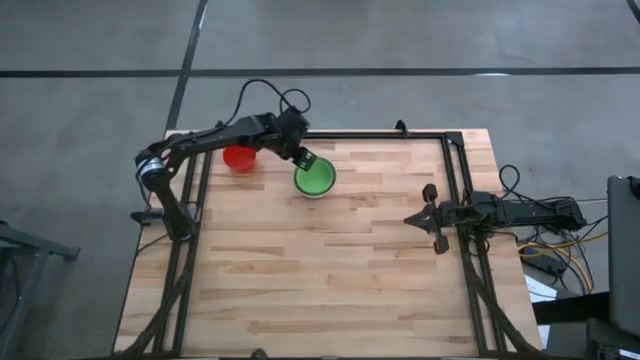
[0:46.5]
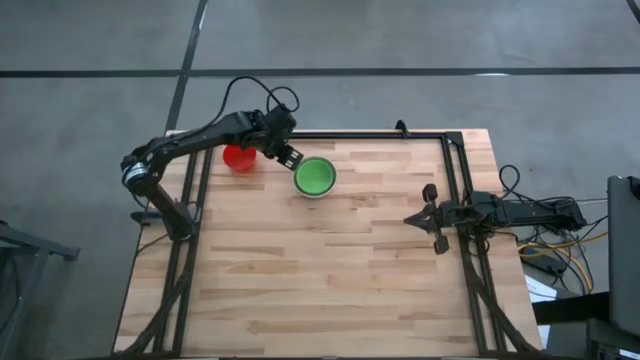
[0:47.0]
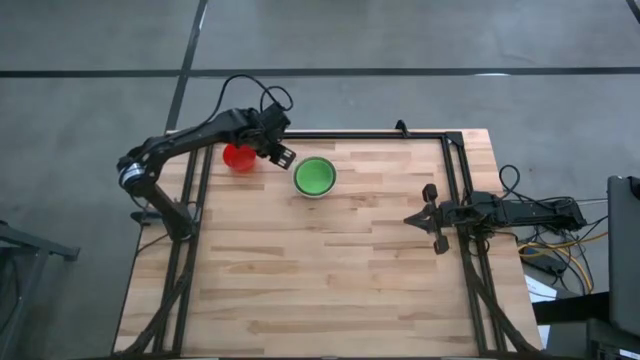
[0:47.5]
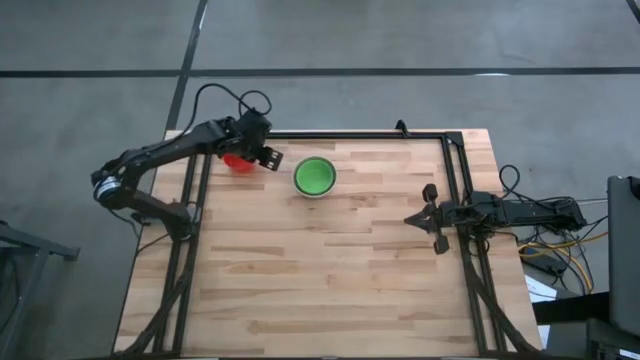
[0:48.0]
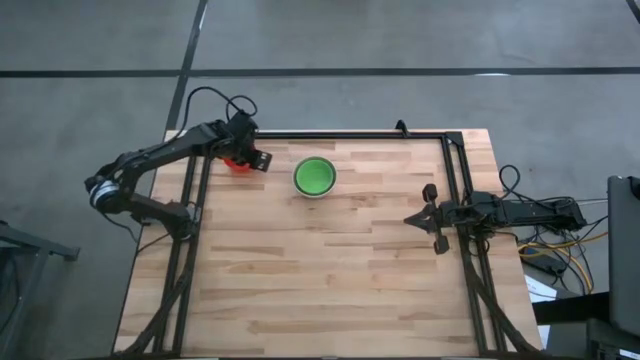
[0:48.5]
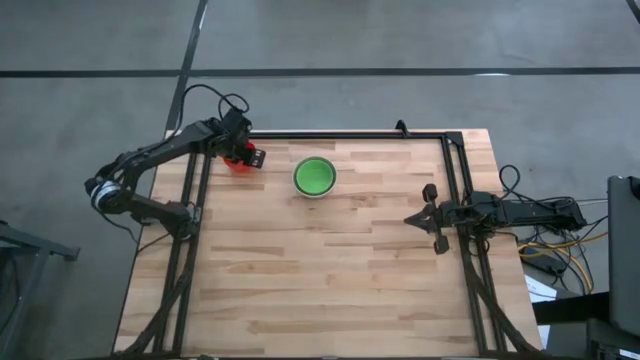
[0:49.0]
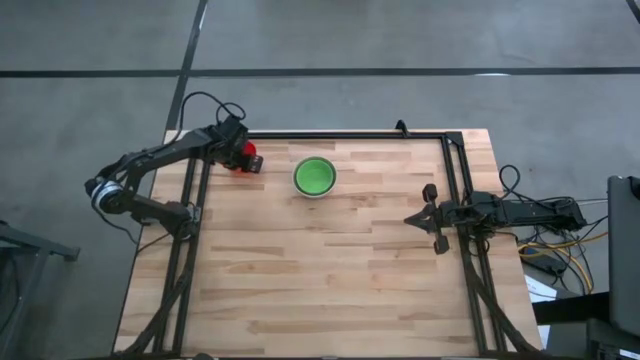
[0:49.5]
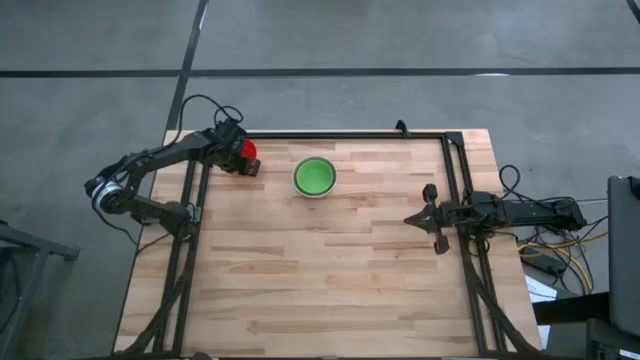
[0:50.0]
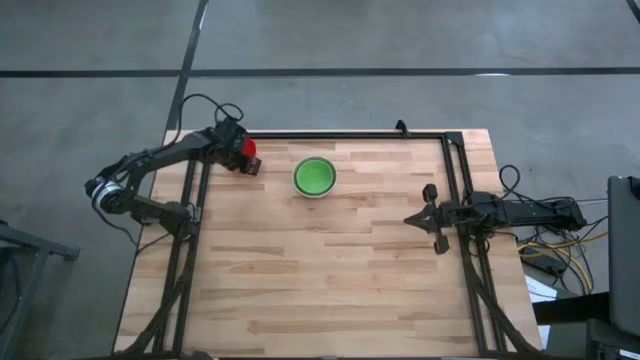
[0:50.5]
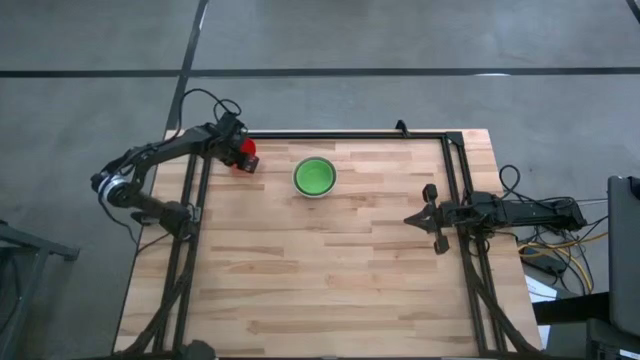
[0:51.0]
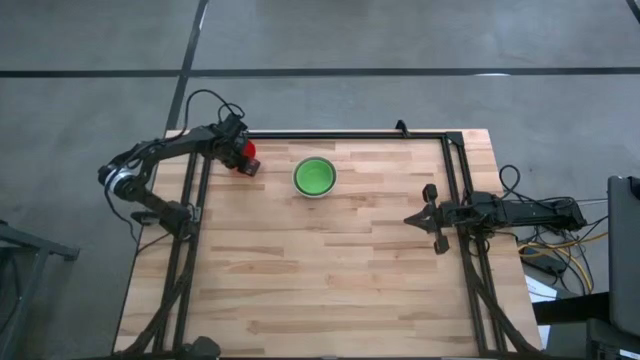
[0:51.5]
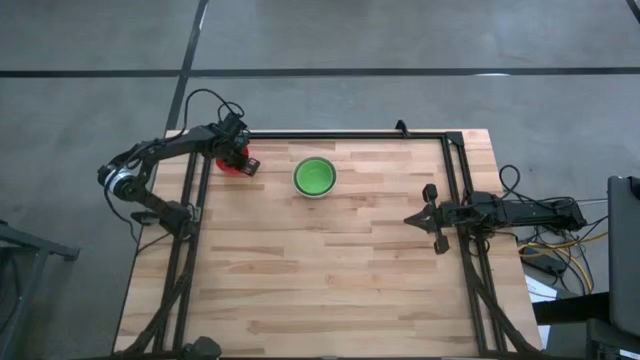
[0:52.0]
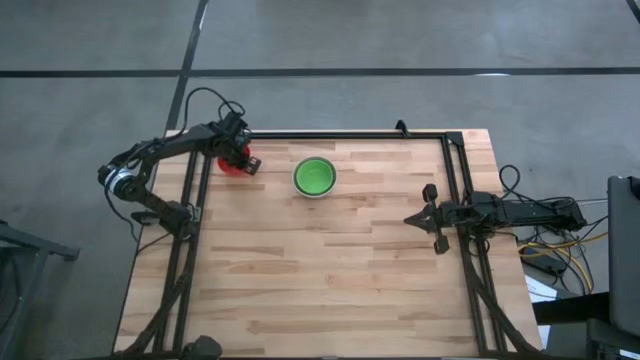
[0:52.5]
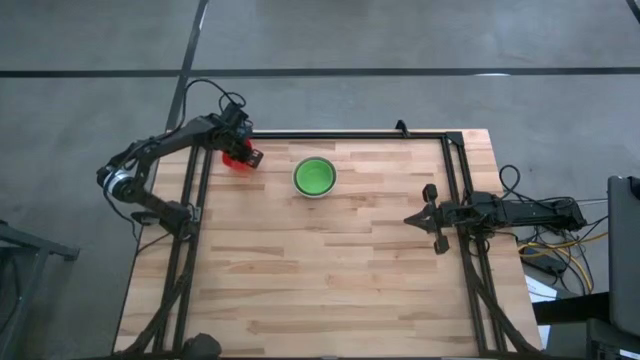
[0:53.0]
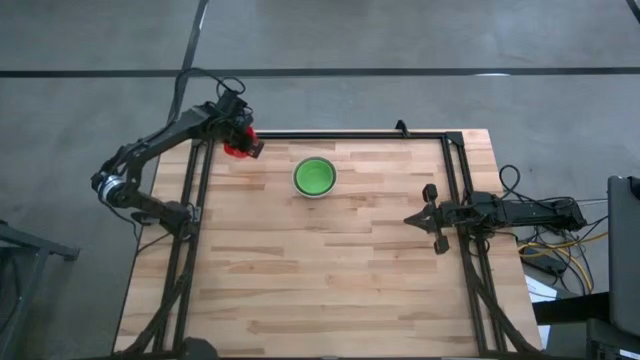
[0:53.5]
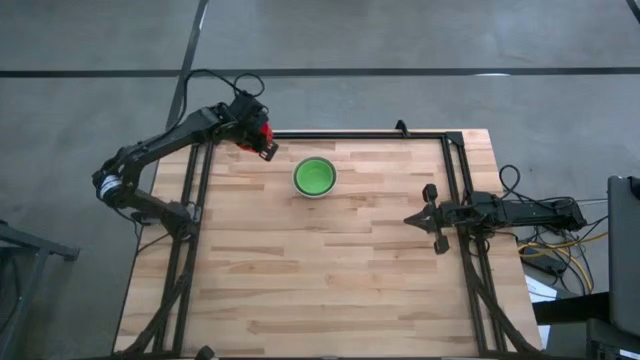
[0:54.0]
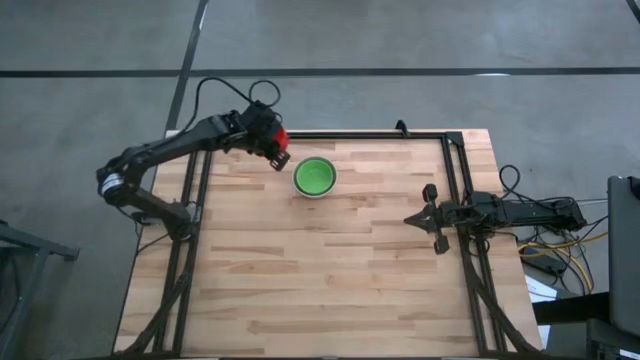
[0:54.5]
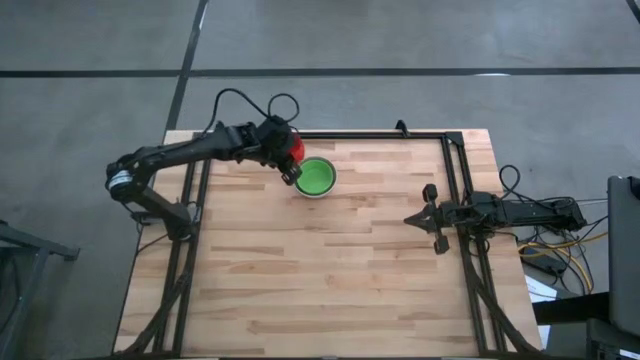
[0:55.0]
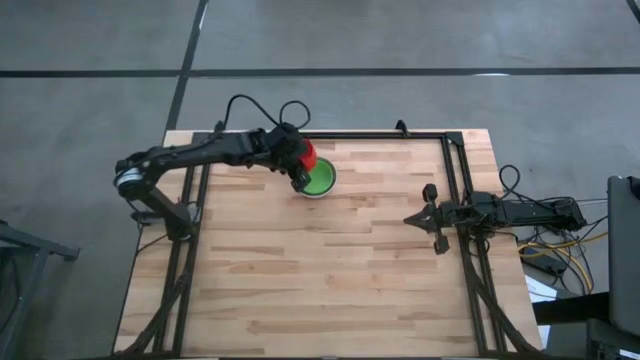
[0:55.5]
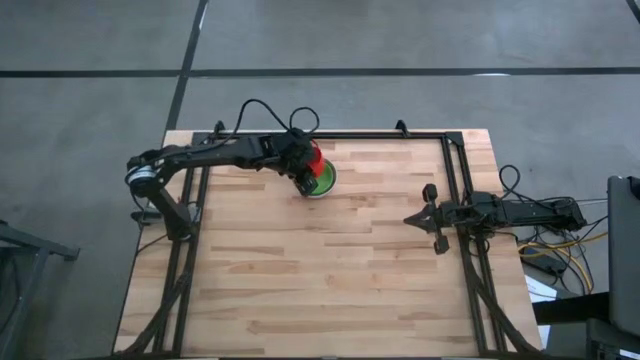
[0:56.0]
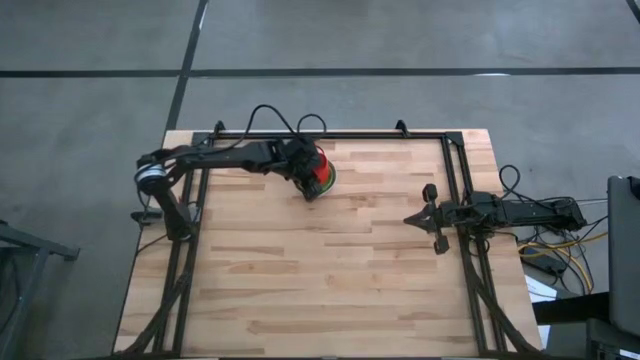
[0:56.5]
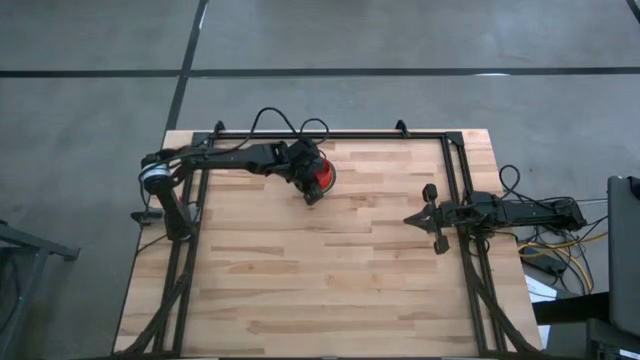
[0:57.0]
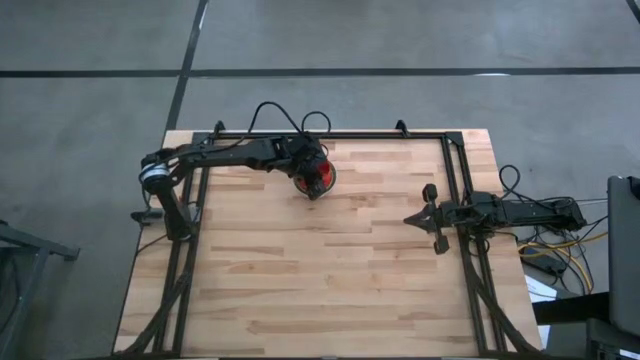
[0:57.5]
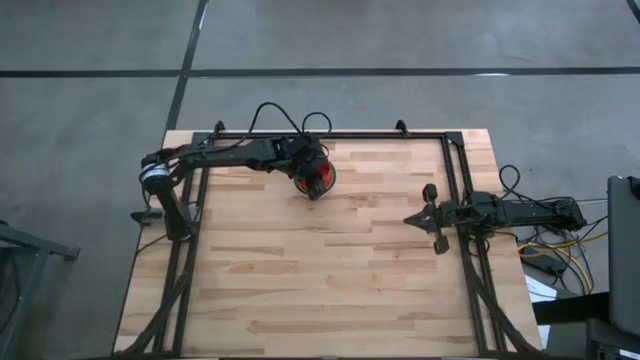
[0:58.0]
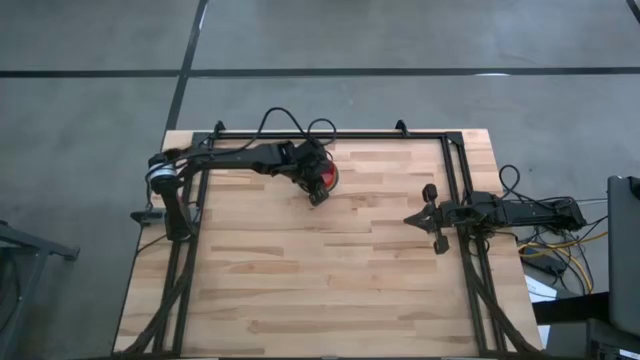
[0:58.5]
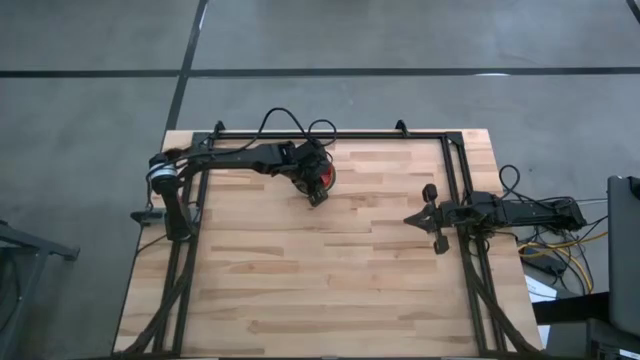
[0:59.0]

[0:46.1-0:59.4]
Stack the red bowl on the green bowl

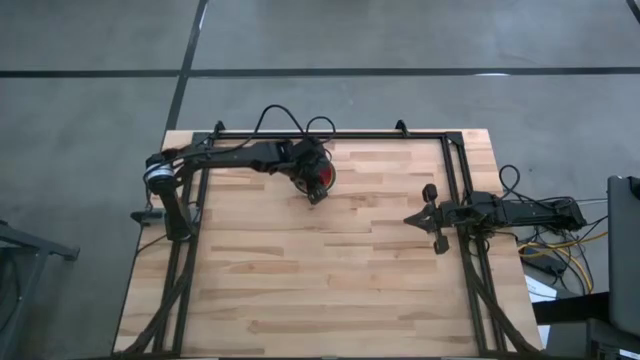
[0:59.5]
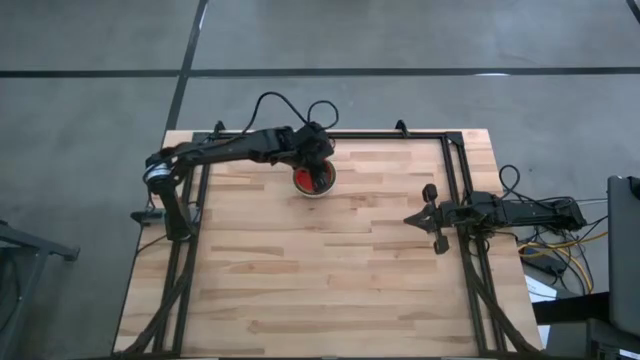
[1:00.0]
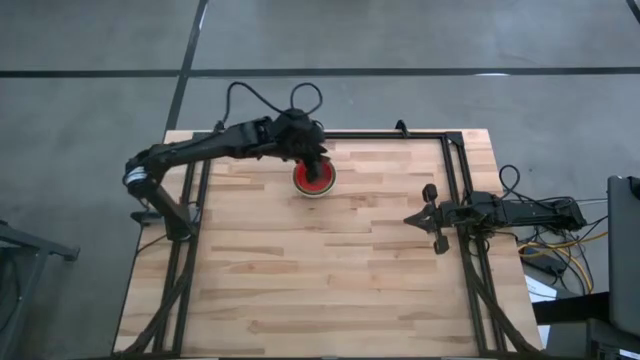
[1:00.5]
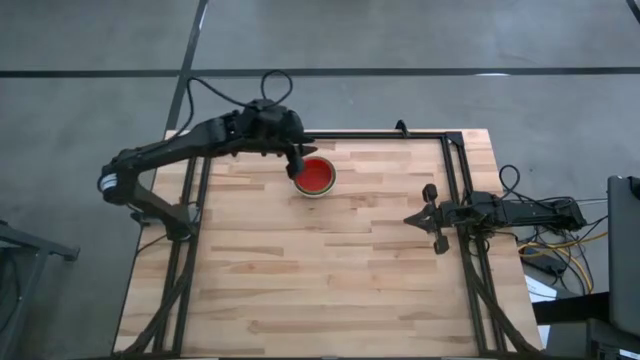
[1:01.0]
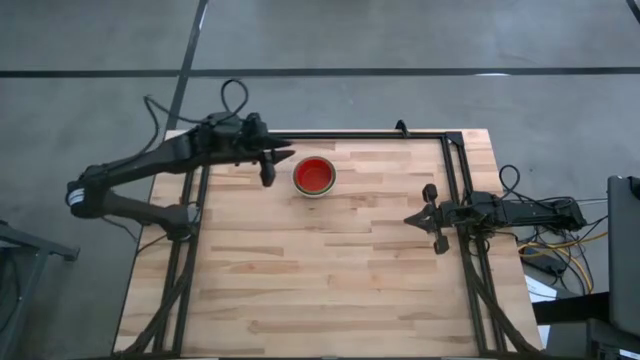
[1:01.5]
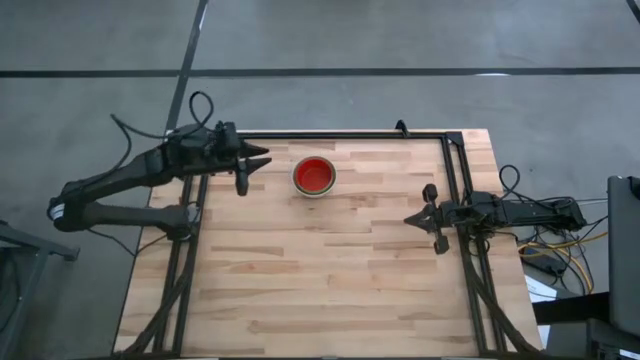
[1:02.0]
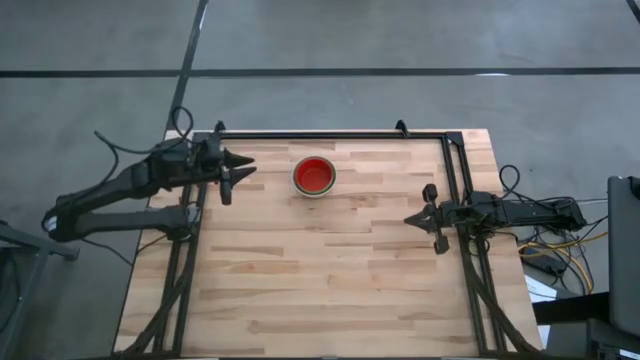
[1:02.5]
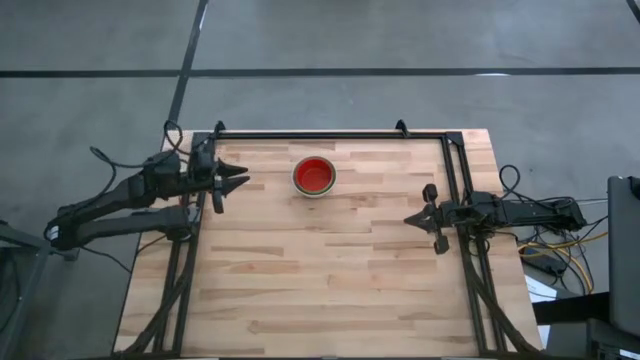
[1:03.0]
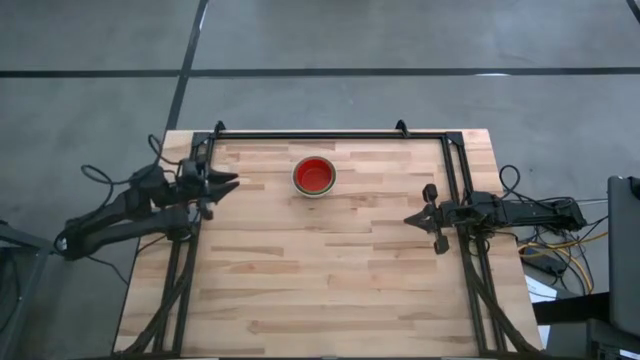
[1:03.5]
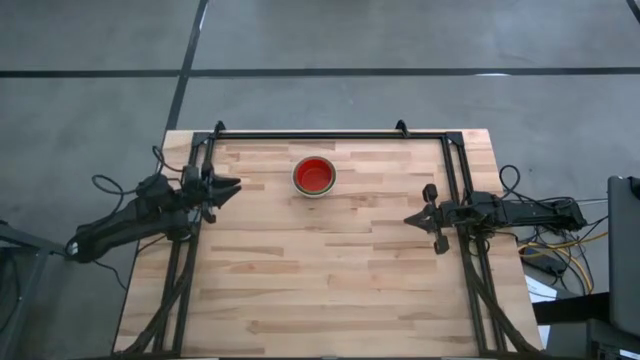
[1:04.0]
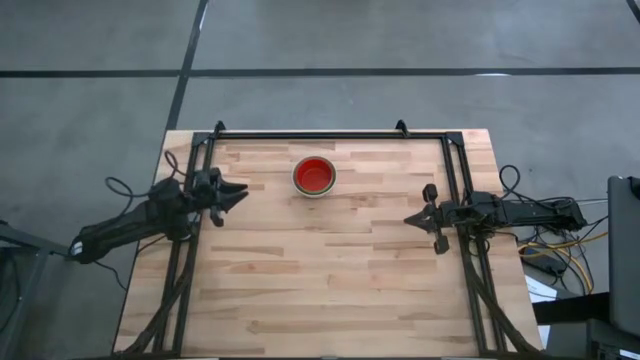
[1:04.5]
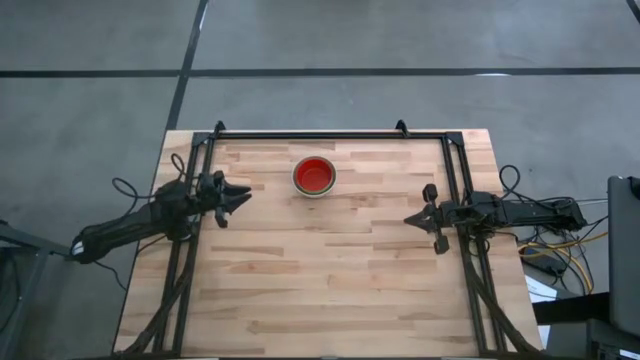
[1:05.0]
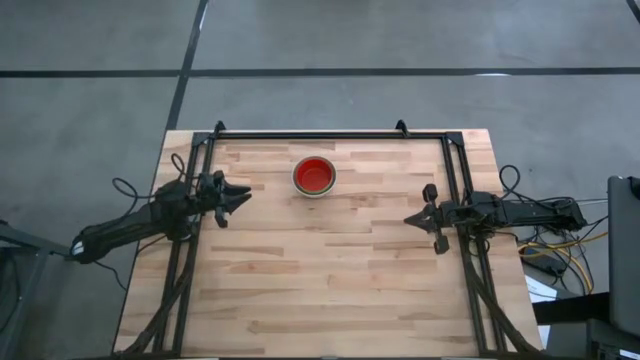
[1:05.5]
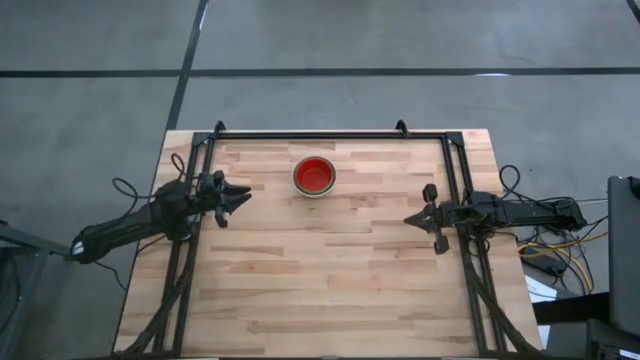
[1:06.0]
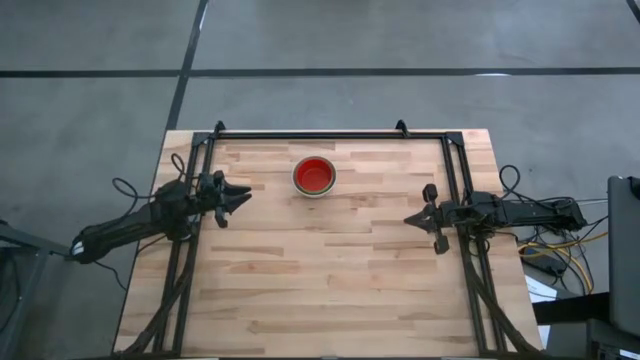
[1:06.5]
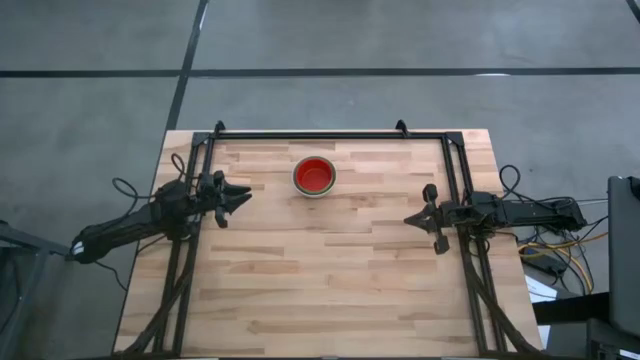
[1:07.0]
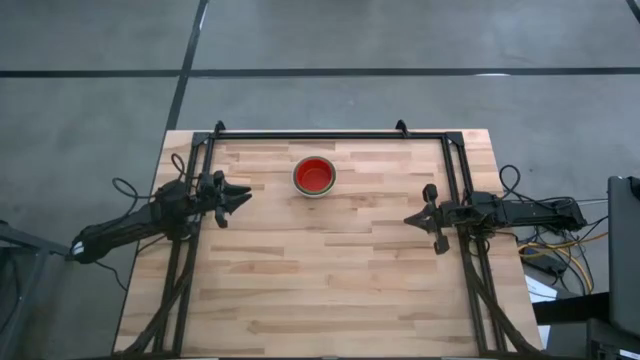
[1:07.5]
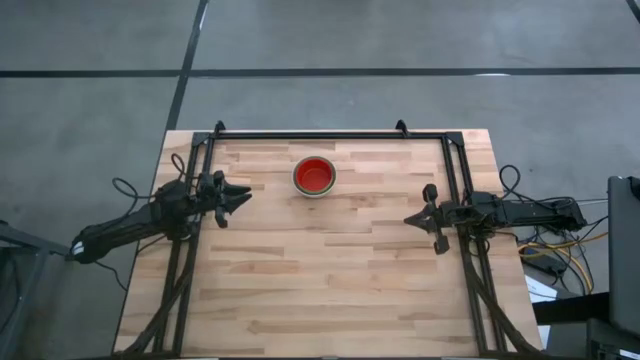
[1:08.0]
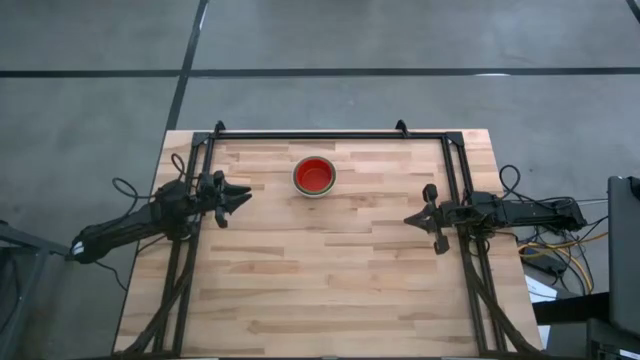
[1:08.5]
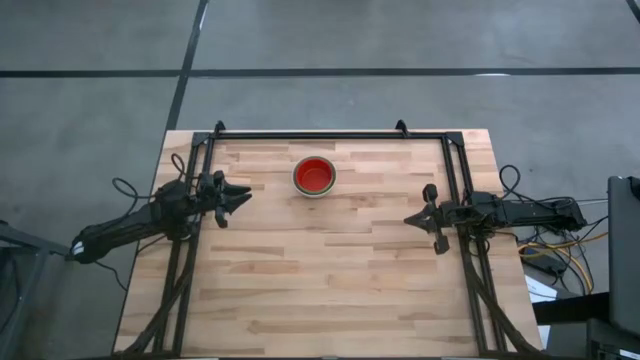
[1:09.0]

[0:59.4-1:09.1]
Return to Home Position
